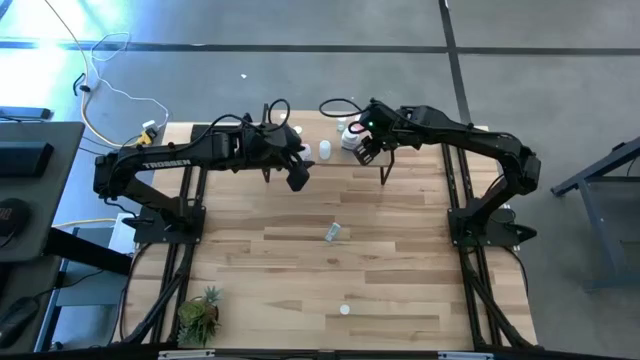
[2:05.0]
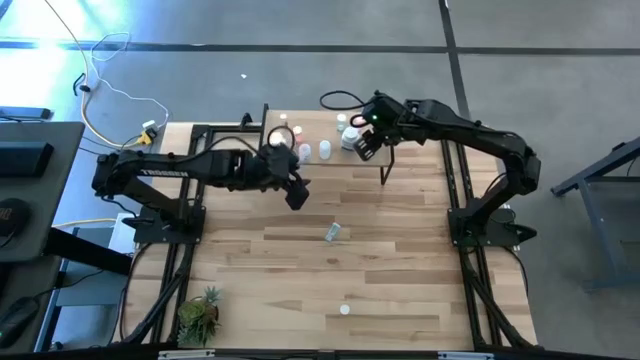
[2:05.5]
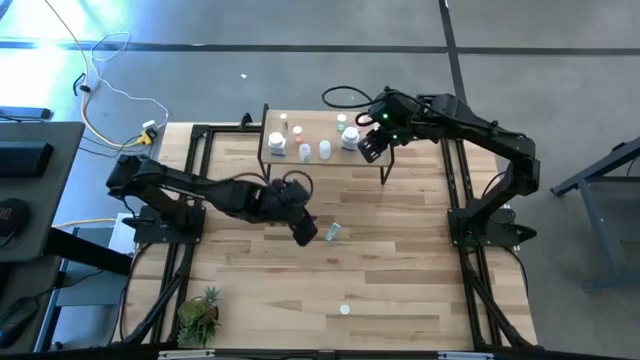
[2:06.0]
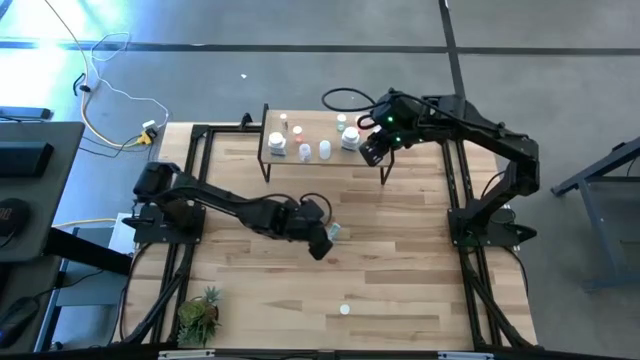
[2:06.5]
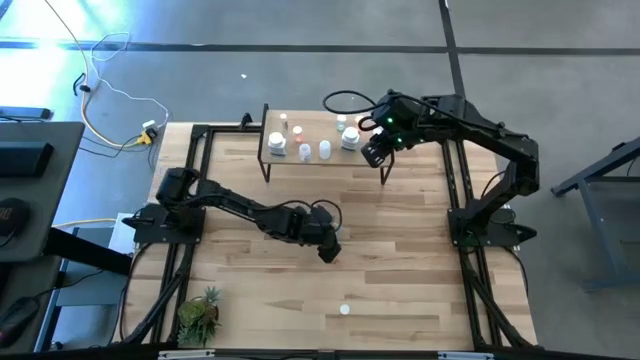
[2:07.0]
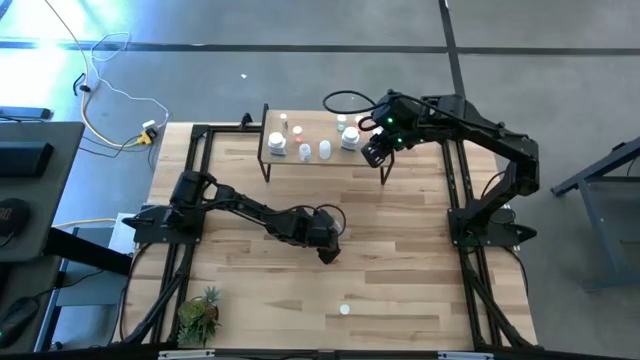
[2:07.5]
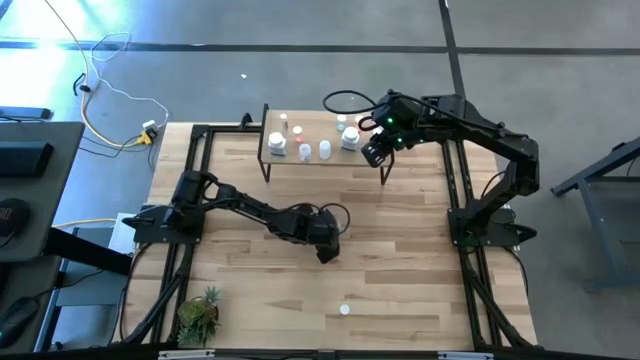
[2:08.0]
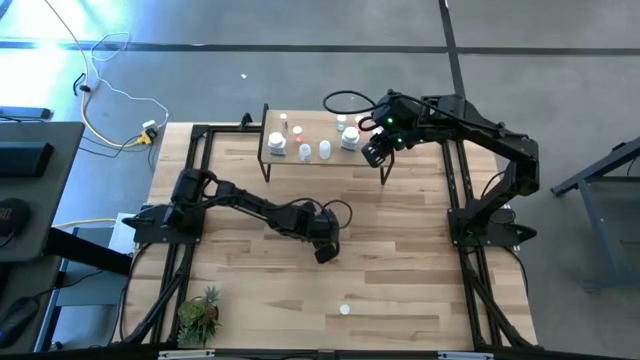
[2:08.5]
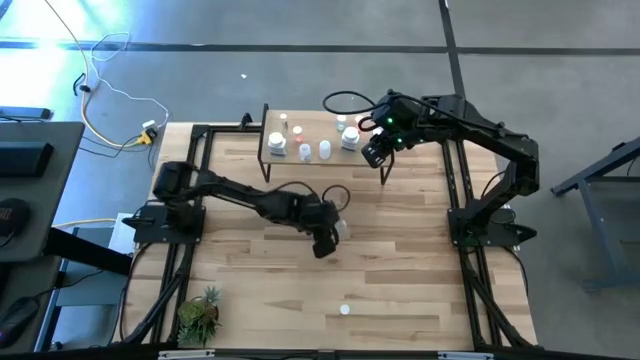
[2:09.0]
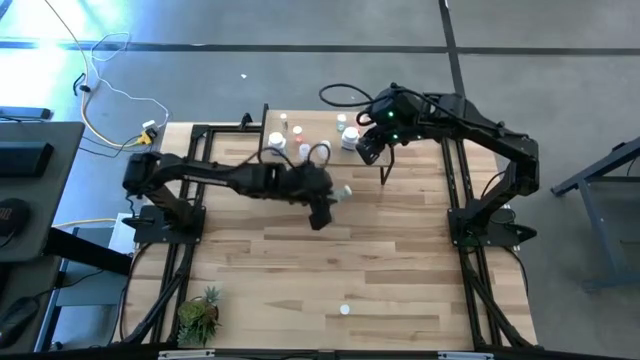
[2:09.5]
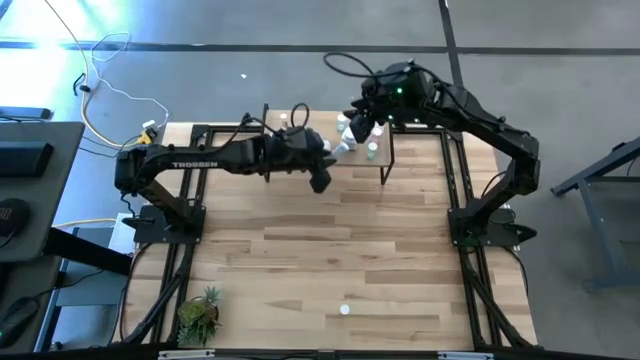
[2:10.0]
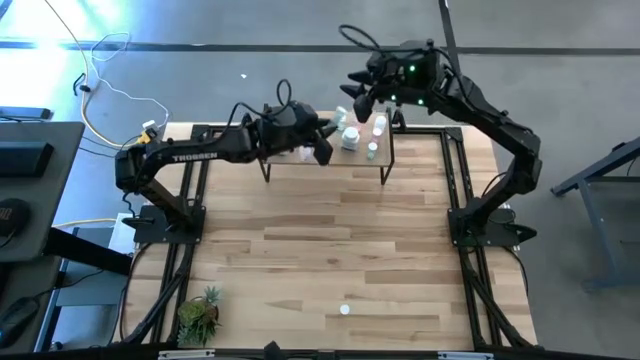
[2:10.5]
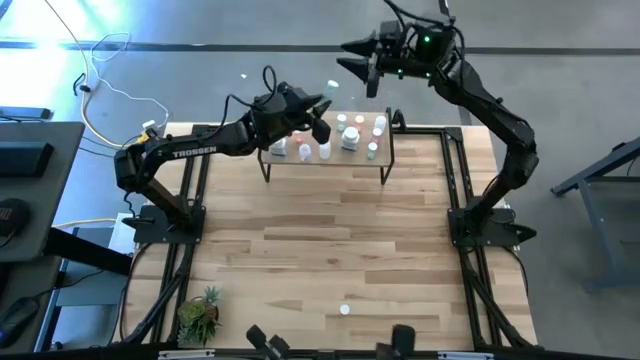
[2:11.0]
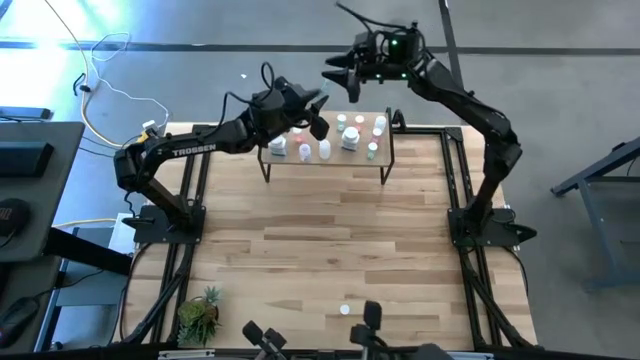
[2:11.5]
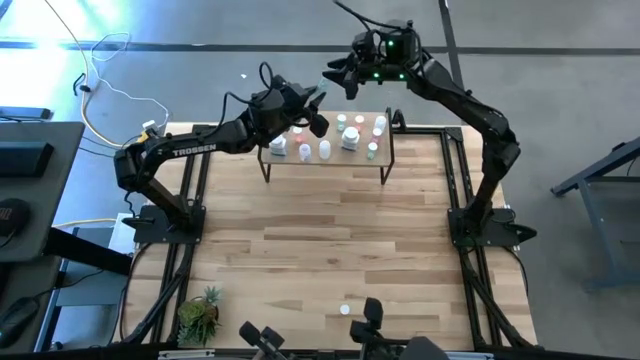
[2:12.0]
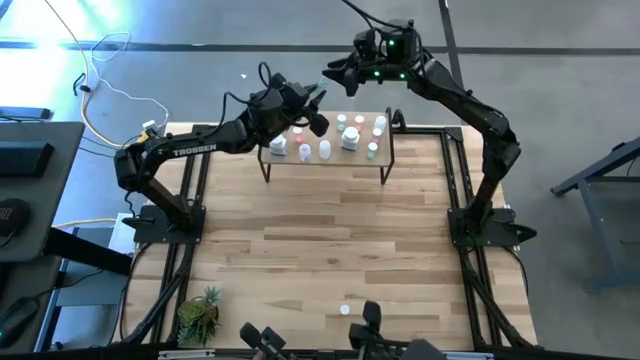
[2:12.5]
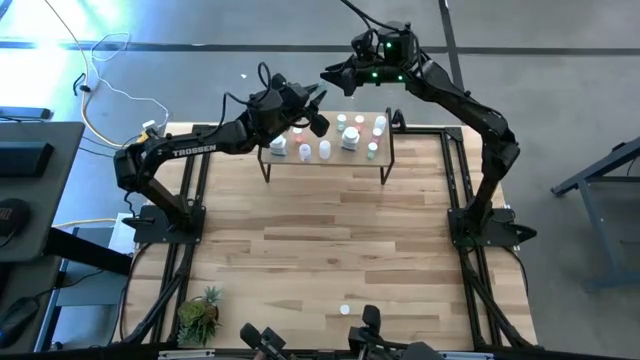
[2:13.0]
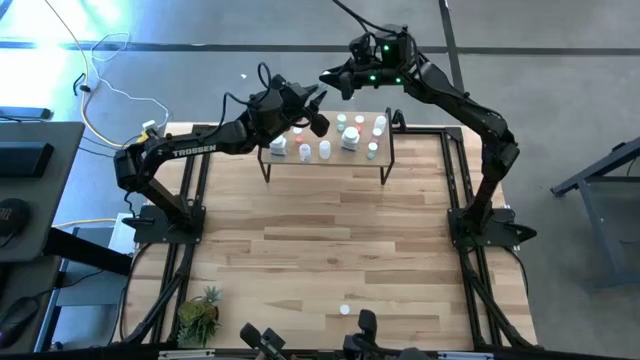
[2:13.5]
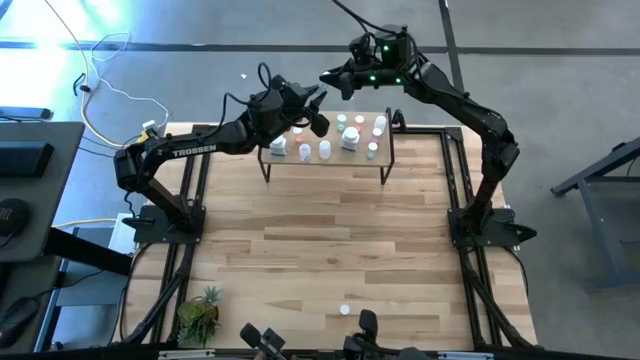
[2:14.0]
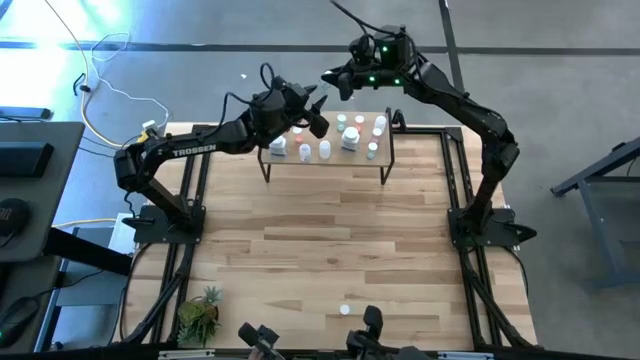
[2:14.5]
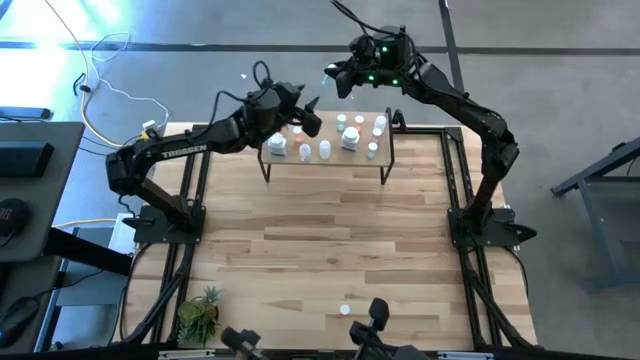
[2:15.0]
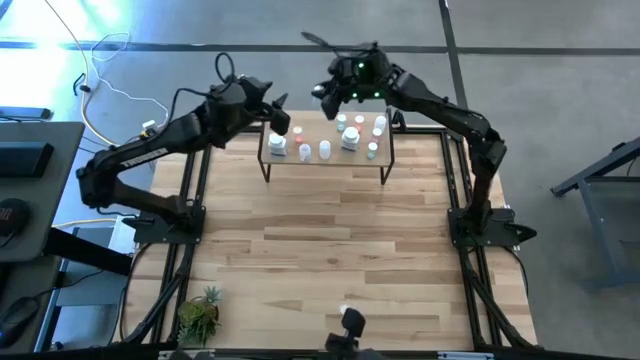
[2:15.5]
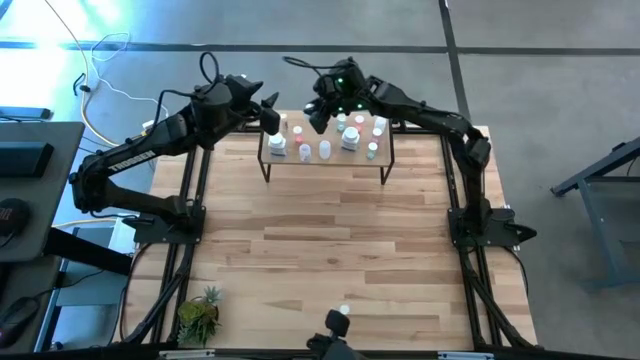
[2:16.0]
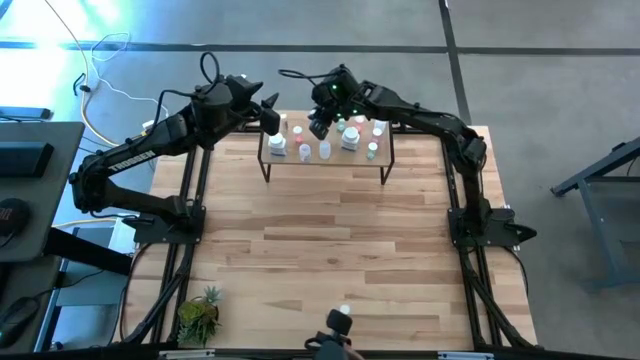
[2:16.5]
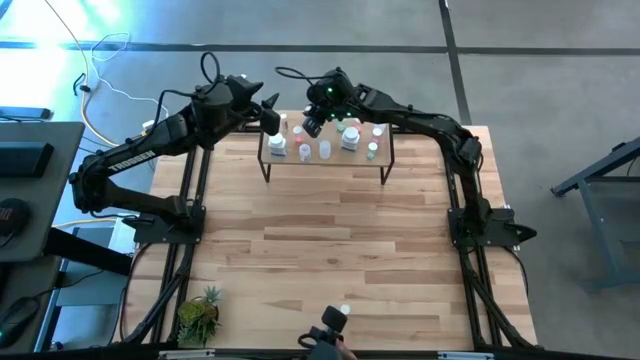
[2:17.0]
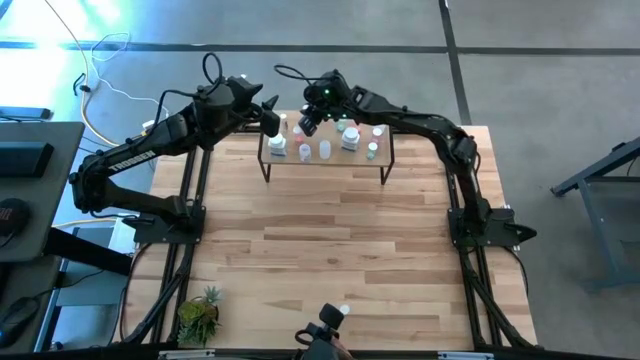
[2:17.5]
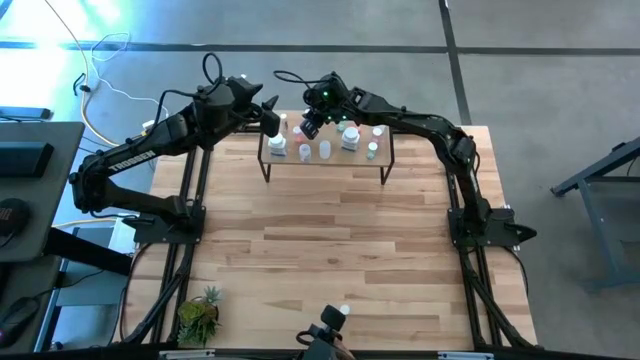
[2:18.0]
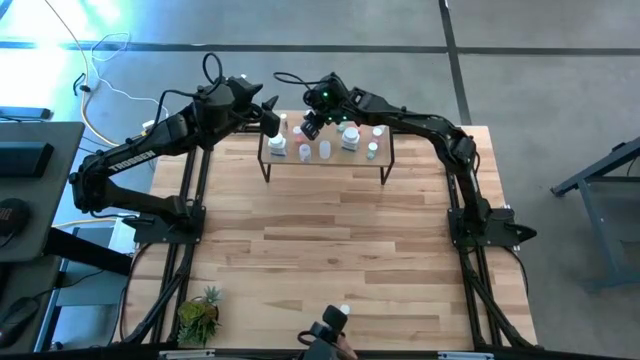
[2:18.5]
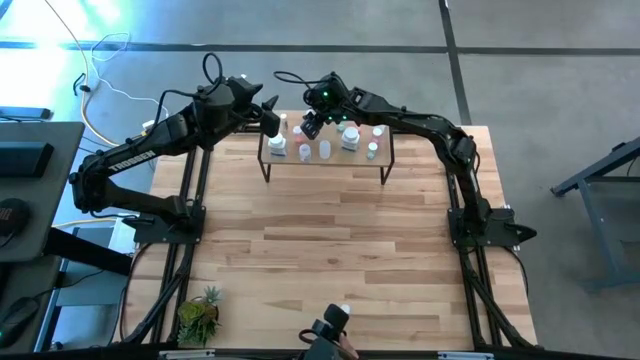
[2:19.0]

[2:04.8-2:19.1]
Task: Pick and place medicine bottles onto shelf by color
Put the blue pill bottle on the shelf

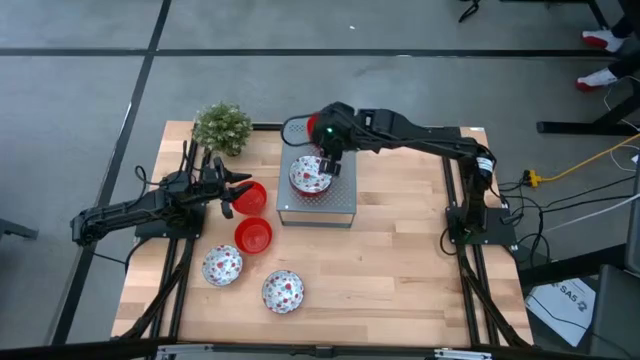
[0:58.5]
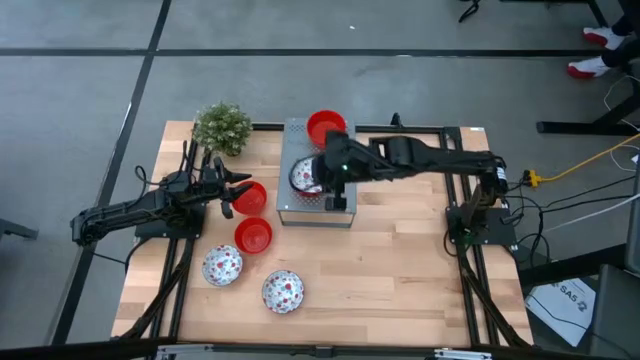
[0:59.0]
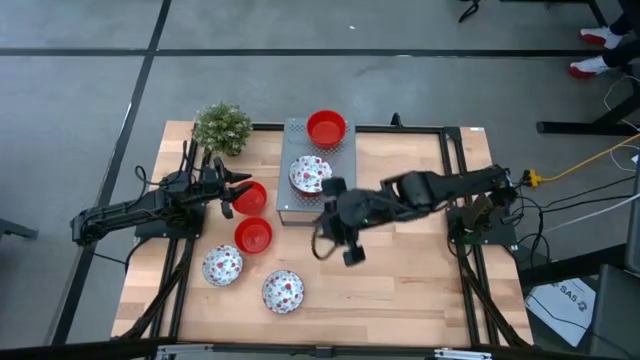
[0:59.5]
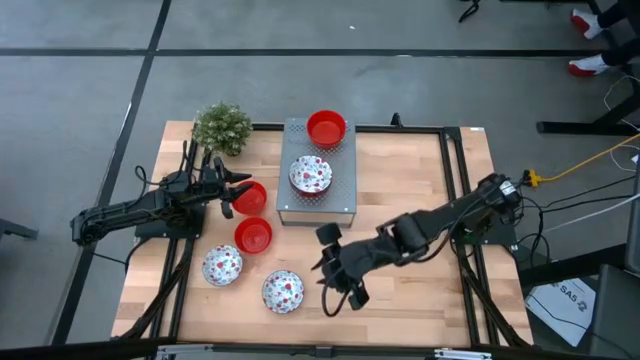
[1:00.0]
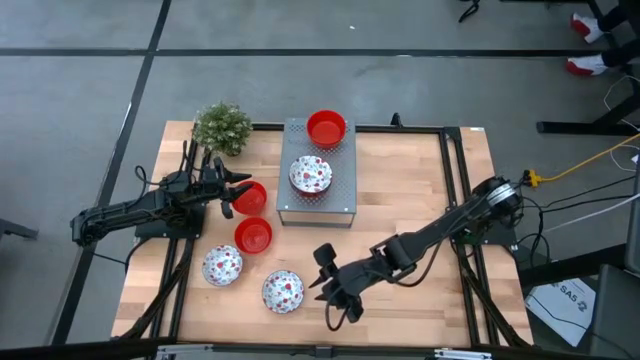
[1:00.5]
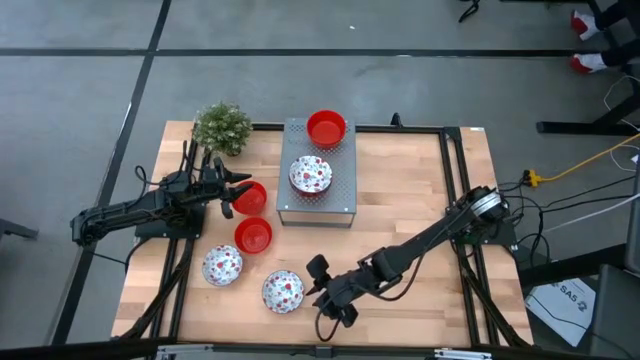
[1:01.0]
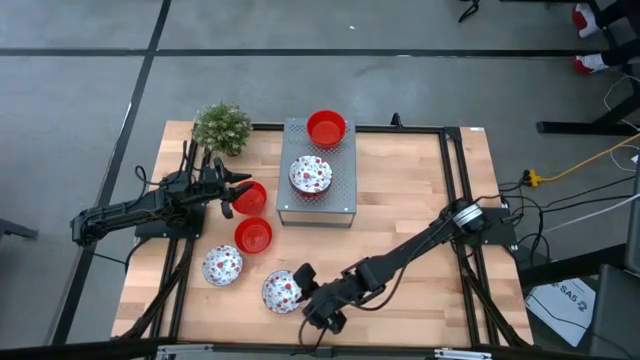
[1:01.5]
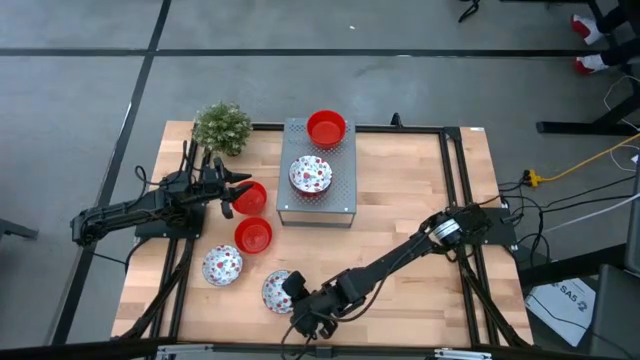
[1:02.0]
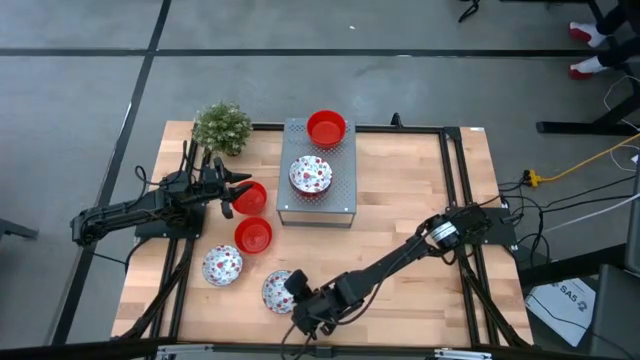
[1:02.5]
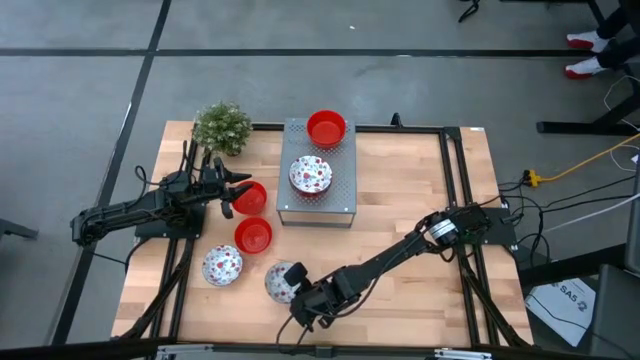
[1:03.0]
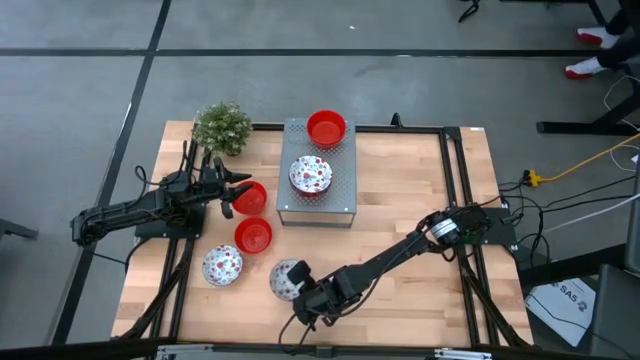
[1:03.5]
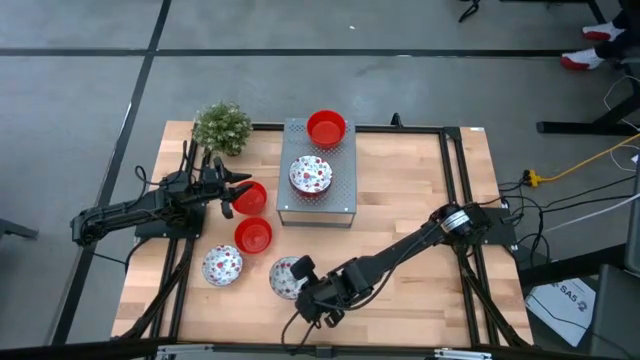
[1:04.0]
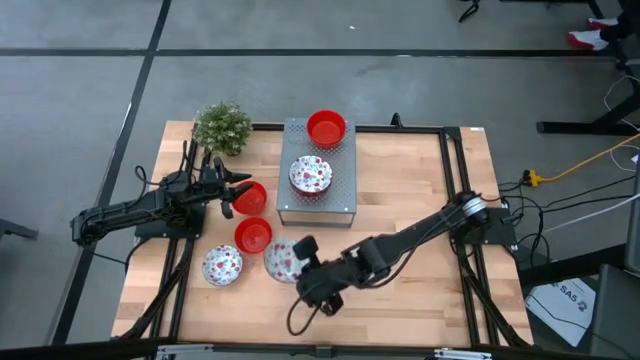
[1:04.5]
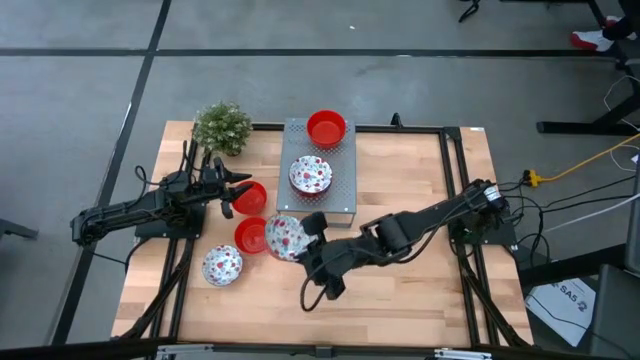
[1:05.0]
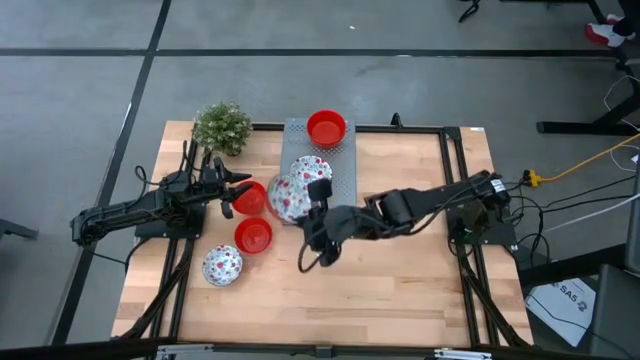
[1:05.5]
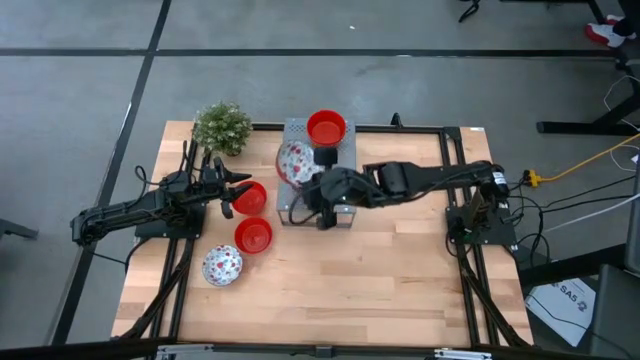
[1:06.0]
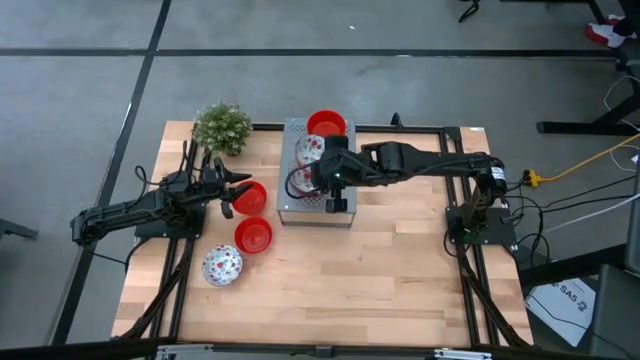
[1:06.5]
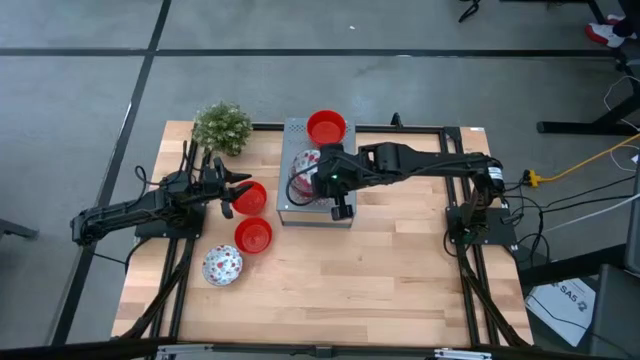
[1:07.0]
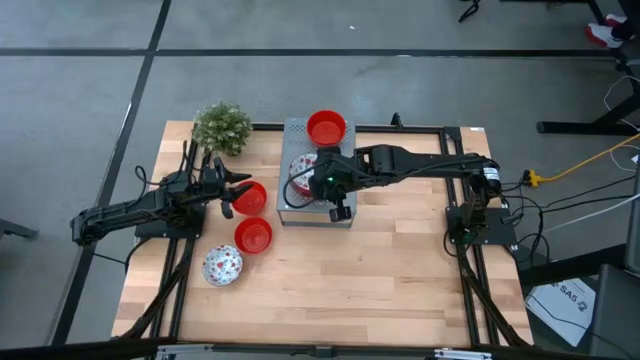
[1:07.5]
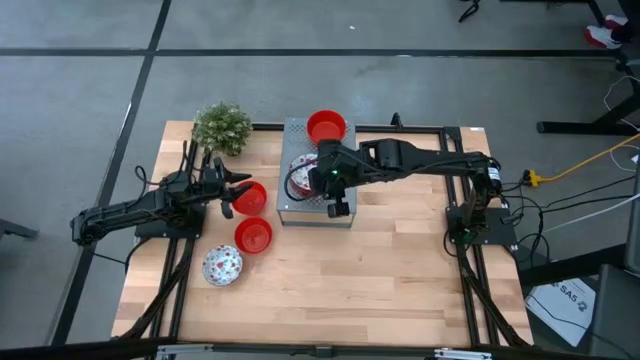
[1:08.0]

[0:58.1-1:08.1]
Task: Pick & Place Mini bowls
Stack the white patterned bowl on the white patterned bowl on the shelf
